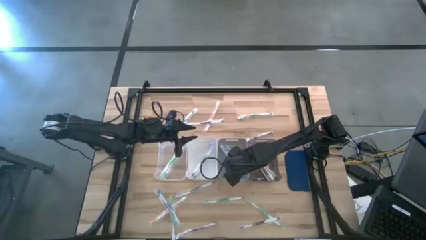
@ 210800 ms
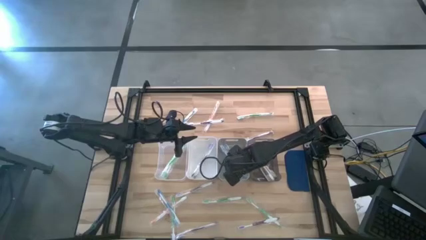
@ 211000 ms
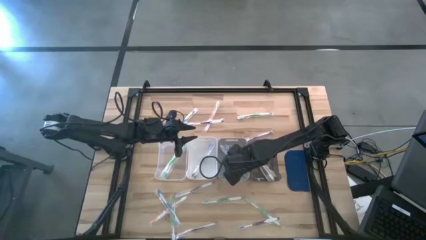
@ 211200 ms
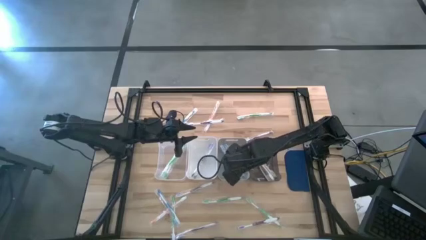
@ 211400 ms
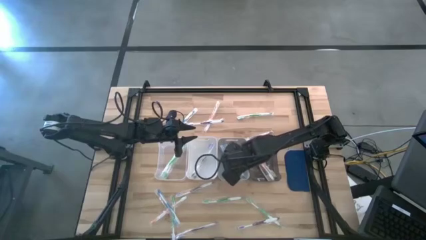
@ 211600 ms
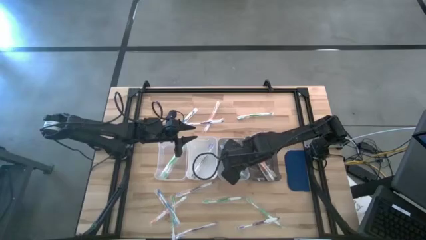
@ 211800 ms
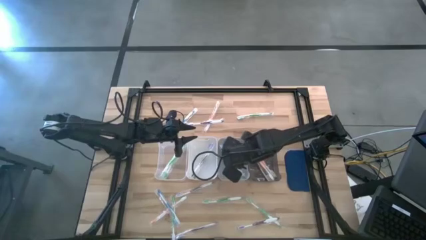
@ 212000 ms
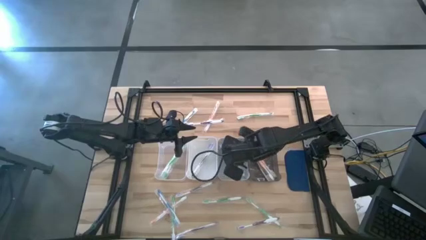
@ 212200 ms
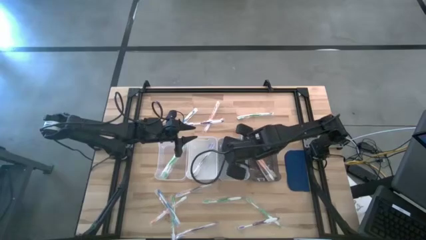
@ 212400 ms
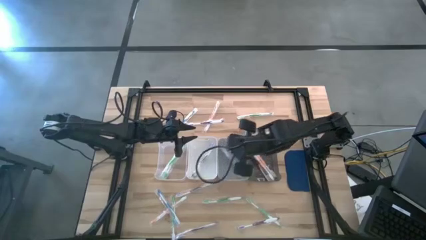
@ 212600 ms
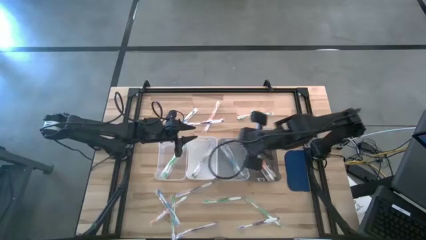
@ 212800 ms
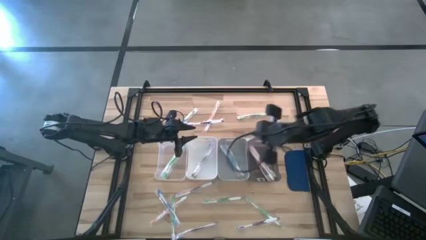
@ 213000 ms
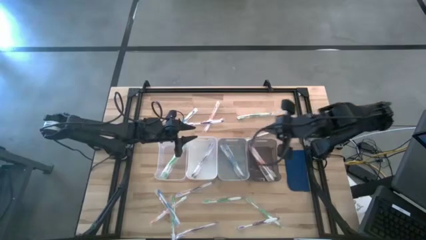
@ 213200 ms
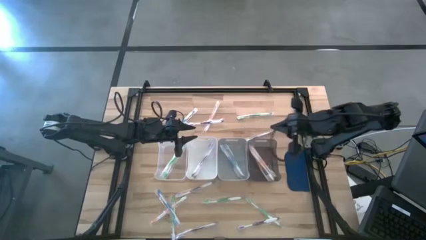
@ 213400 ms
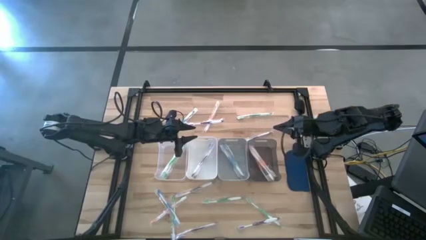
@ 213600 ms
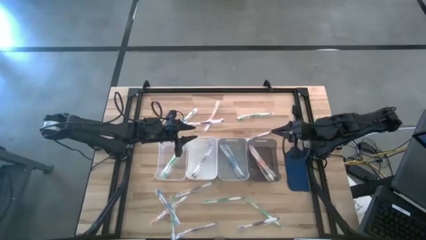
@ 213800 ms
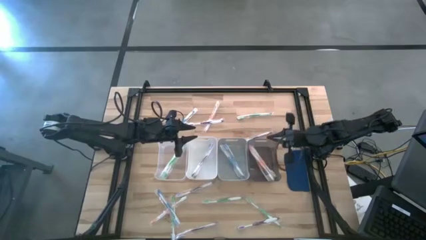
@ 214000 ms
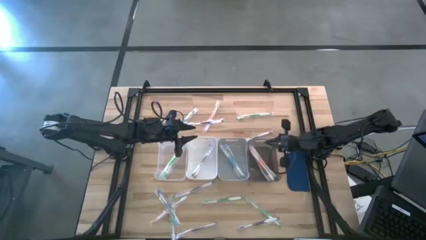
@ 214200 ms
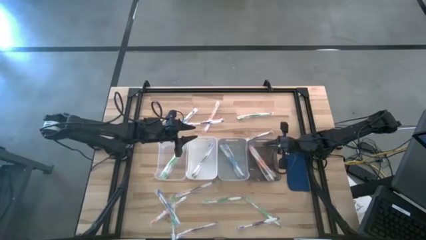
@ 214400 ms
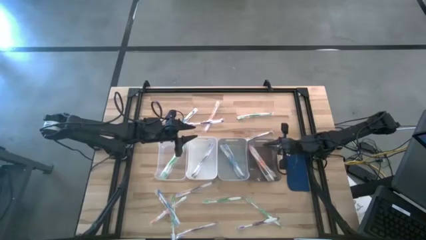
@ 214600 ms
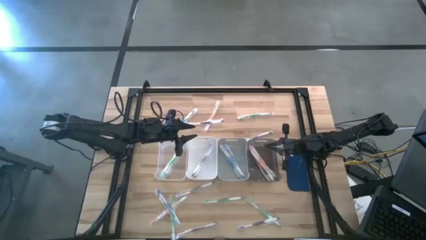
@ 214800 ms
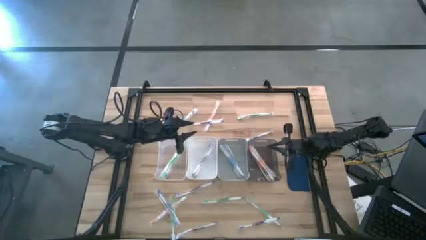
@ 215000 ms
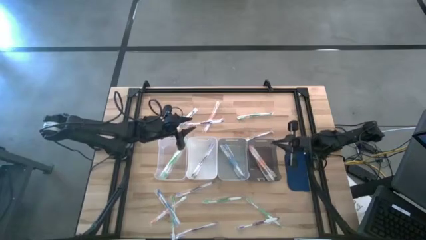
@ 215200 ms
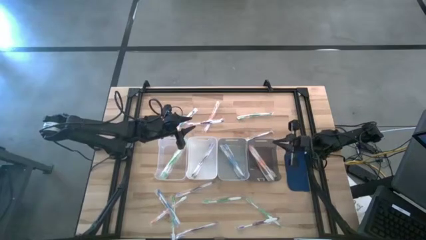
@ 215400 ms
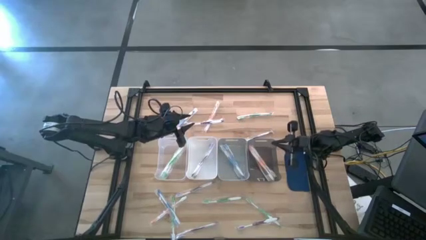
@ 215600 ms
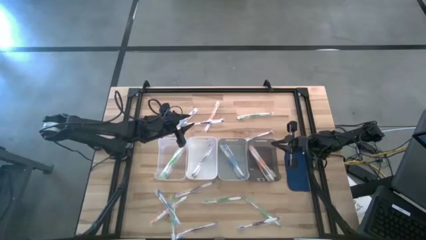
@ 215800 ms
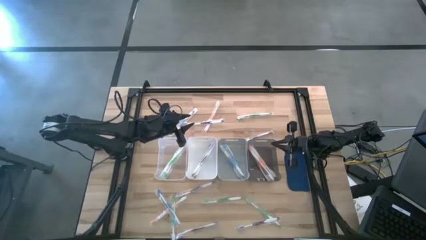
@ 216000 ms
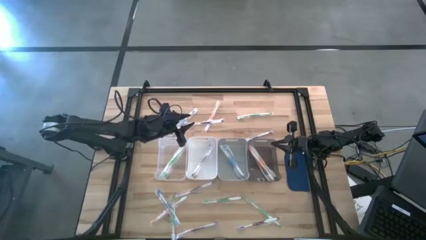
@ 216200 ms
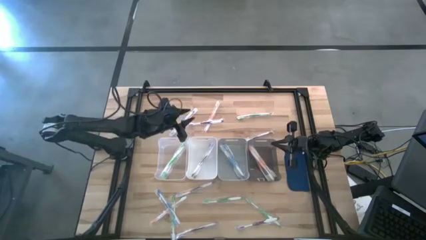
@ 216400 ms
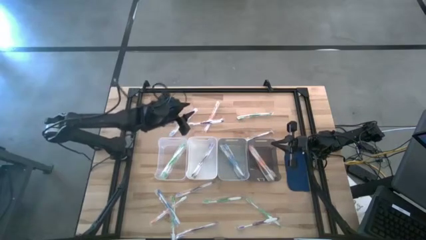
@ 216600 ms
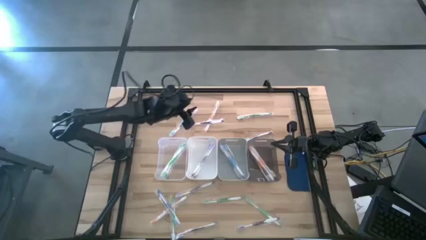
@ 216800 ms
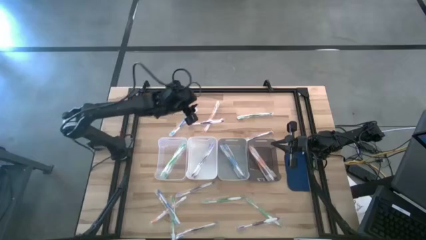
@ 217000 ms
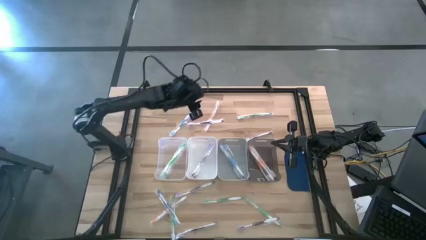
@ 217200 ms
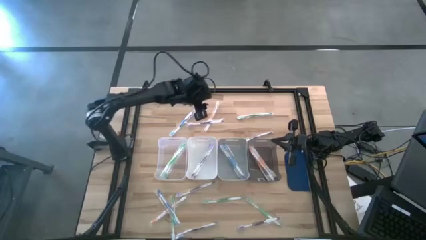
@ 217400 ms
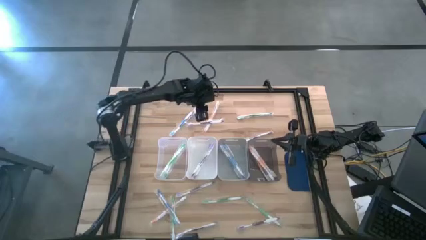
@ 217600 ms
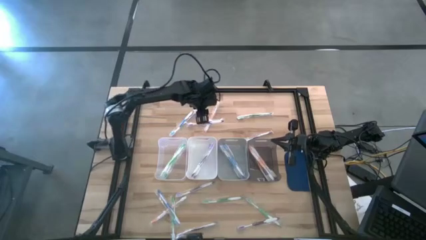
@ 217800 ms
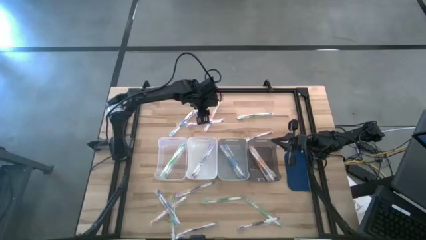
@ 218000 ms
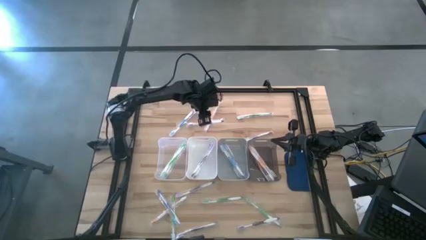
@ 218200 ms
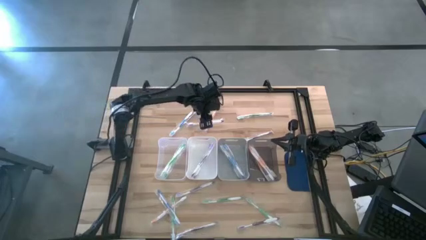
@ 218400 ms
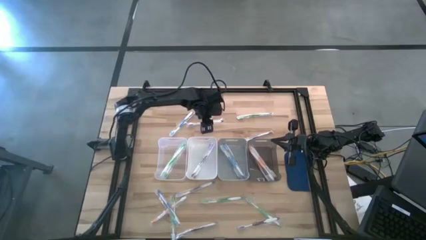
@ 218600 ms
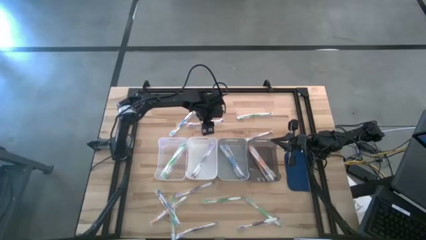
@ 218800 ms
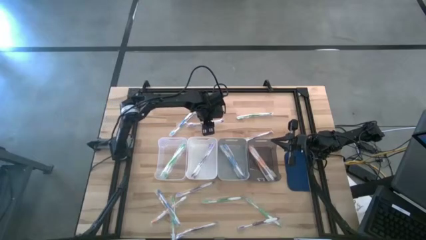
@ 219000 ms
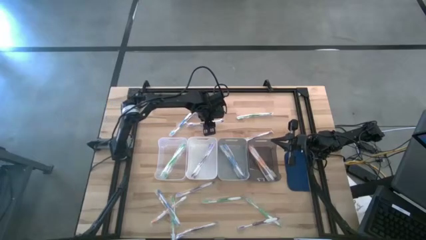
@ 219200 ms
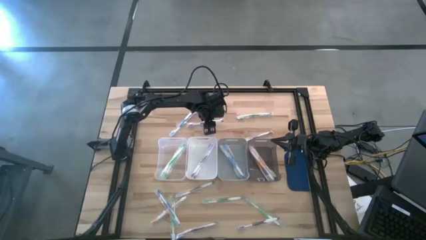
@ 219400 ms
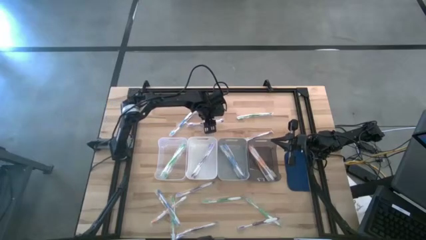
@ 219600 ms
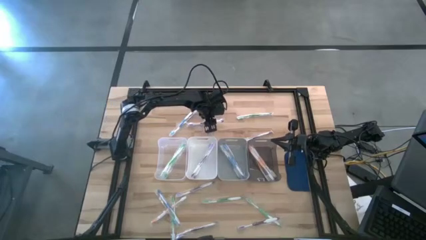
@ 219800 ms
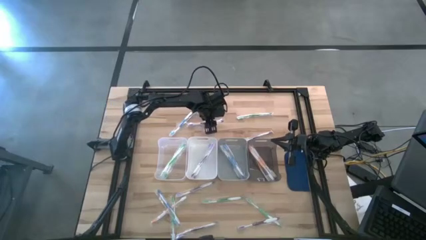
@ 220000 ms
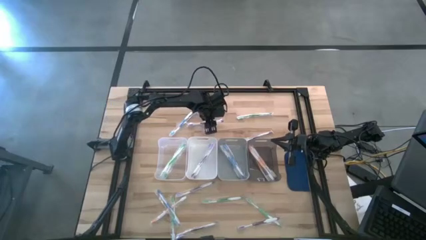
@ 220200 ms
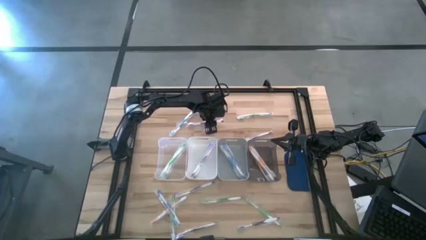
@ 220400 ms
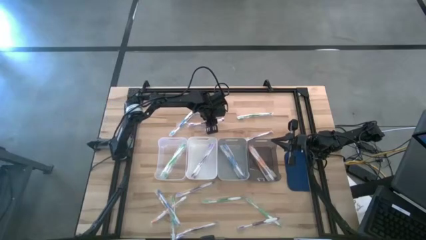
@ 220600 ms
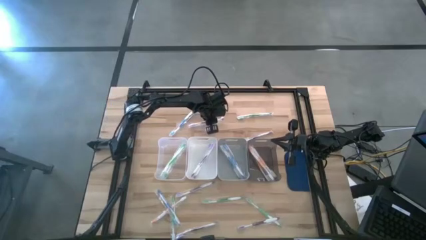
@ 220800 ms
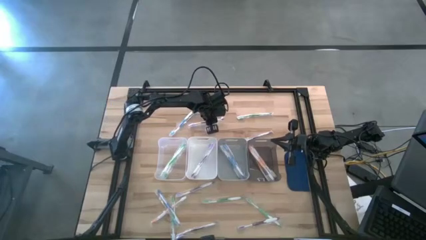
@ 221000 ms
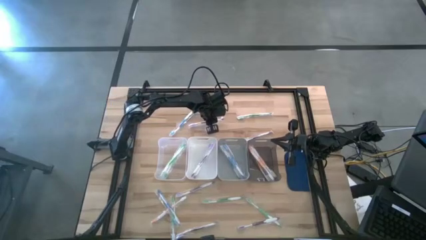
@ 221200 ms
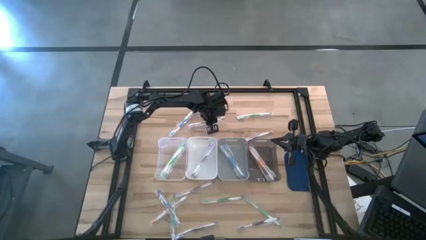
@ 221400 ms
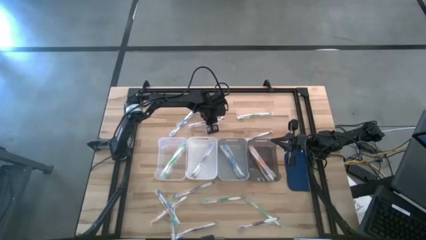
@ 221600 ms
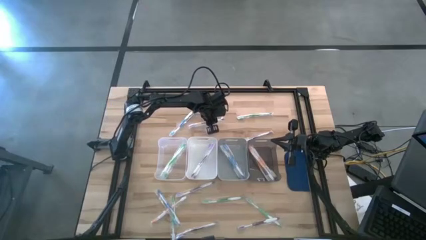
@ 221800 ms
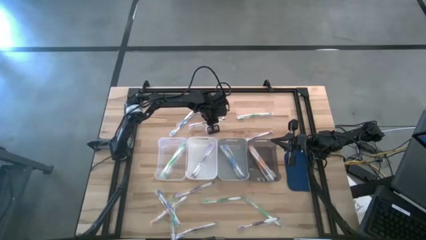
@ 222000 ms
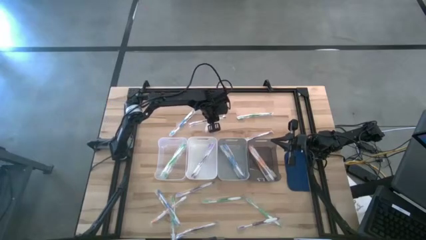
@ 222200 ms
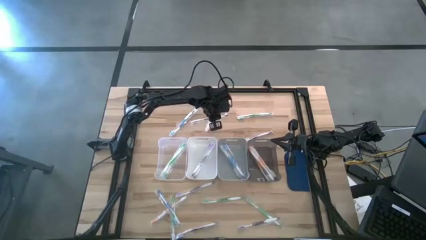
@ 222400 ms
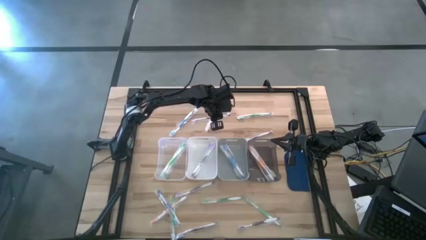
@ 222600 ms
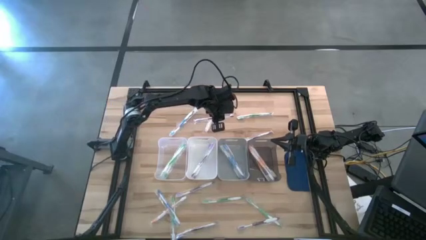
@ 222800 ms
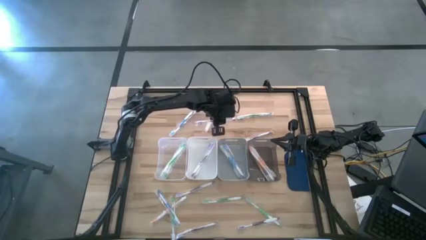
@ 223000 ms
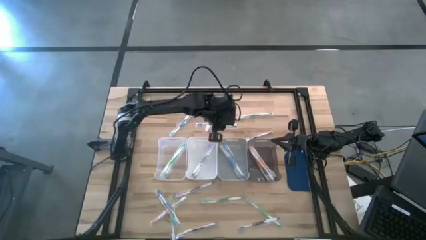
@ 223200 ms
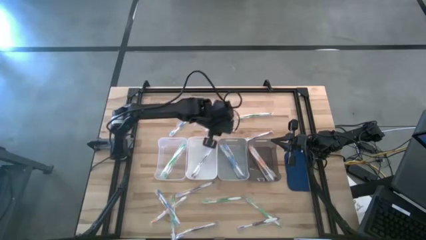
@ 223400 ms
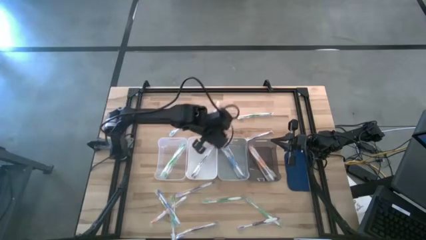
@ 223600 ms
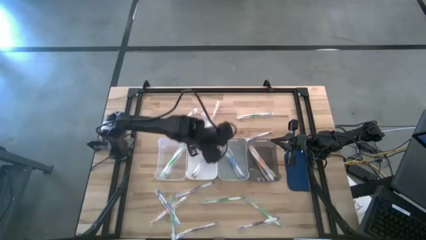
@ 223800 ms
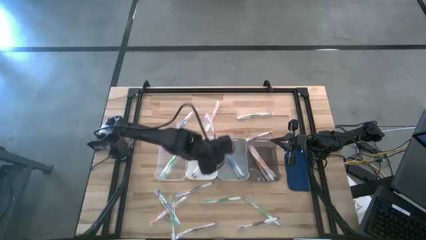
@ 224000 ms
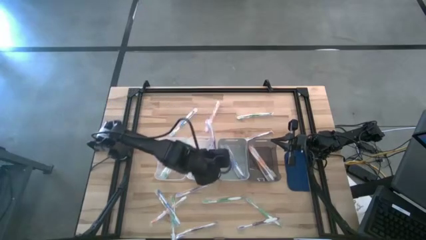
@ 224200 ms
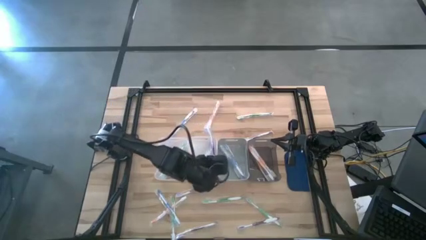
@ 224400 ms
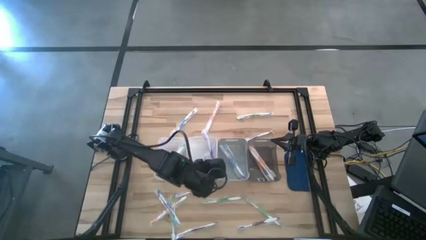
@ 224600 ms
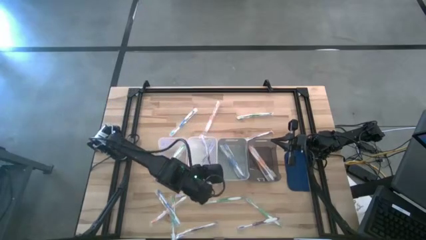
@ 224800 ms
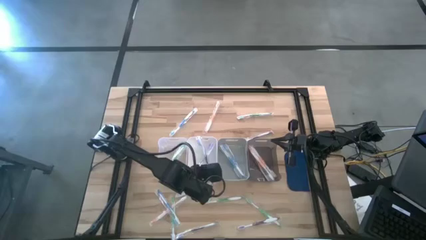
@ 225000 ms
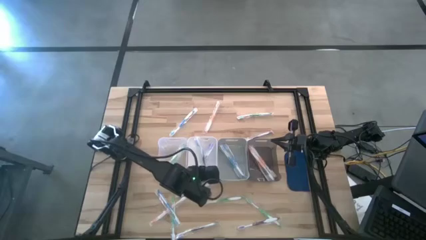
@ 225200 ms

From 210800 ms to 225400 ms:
Task: Pick & Place Toothbrushes
Put the purple toothbrush into the white bin
